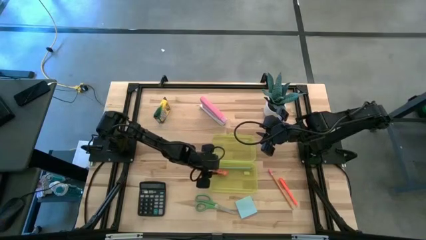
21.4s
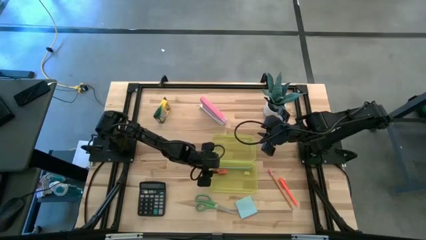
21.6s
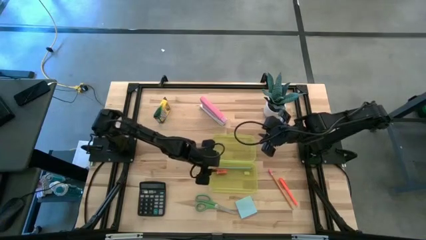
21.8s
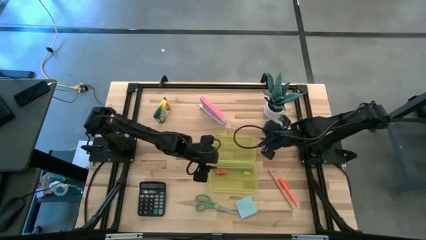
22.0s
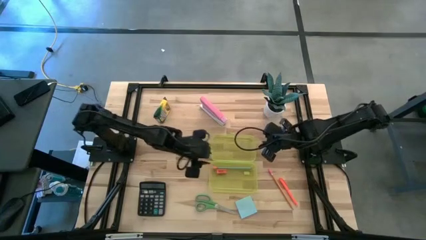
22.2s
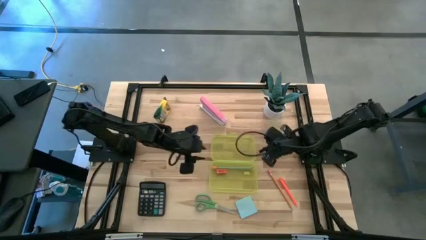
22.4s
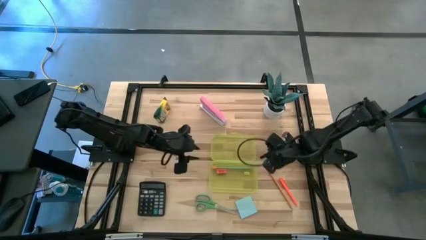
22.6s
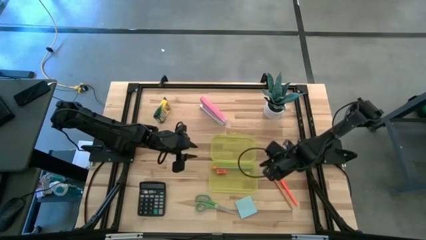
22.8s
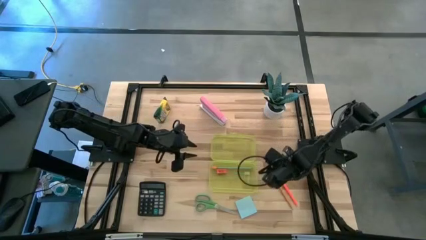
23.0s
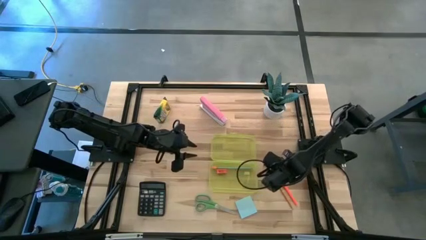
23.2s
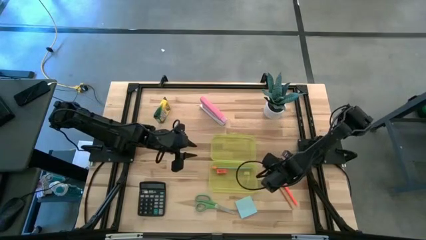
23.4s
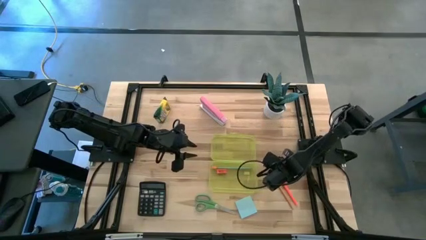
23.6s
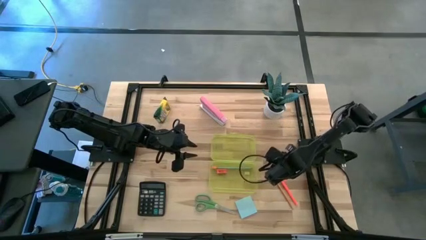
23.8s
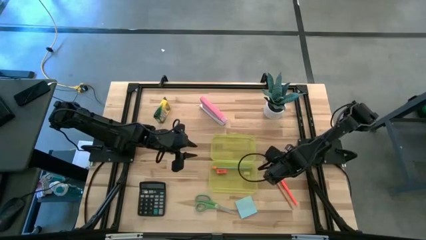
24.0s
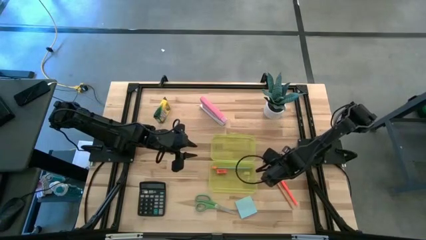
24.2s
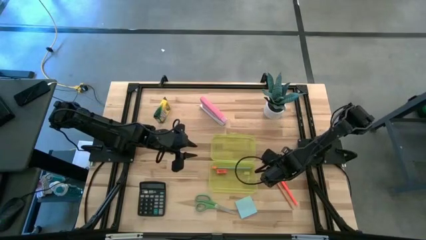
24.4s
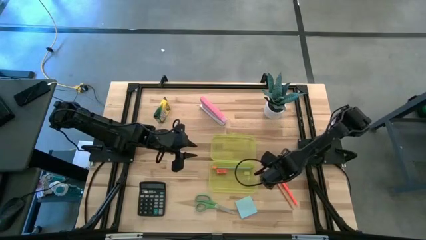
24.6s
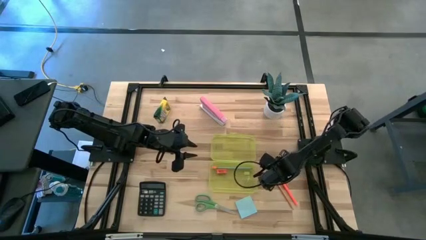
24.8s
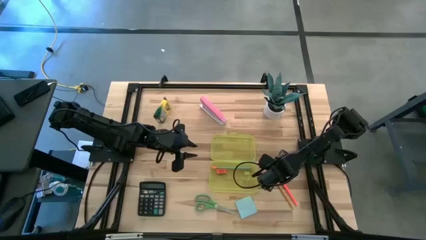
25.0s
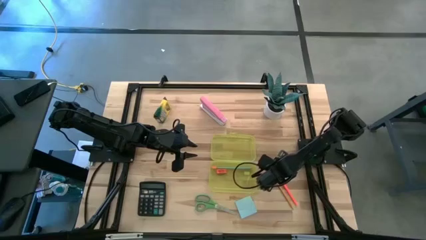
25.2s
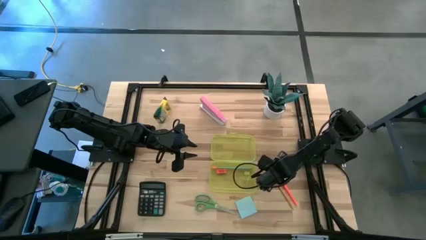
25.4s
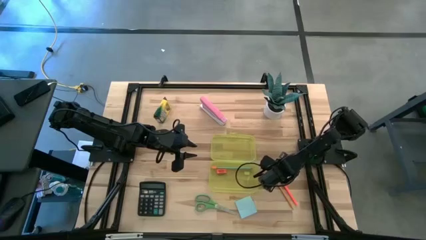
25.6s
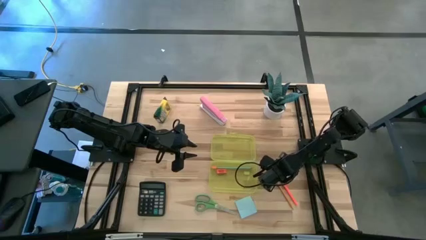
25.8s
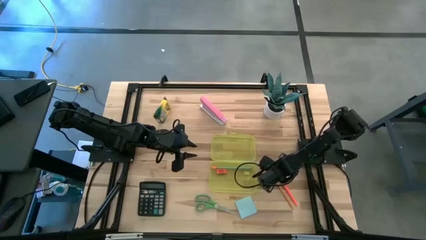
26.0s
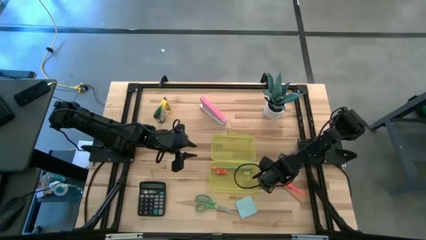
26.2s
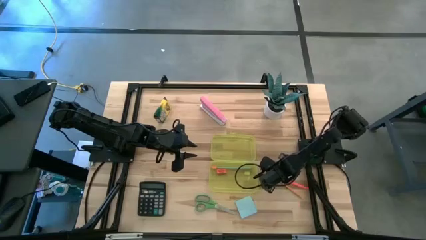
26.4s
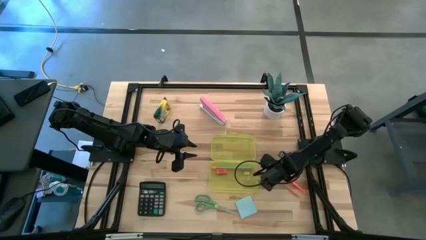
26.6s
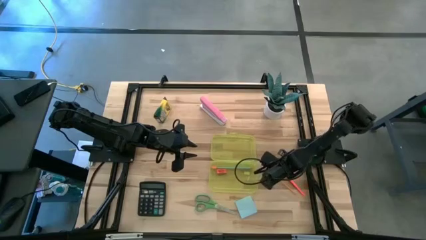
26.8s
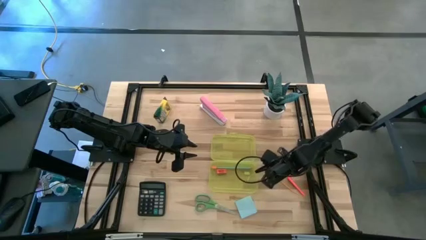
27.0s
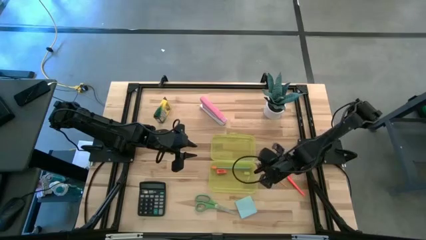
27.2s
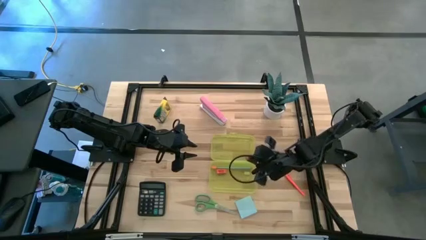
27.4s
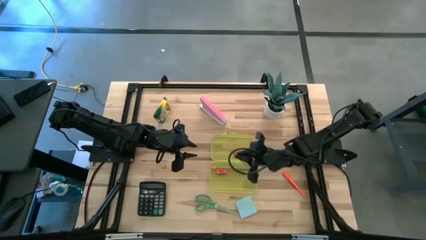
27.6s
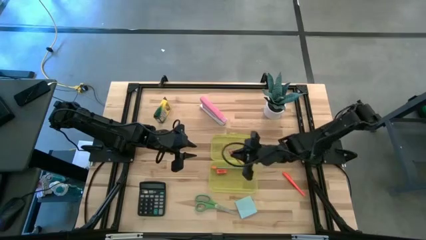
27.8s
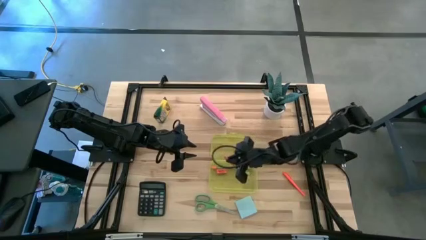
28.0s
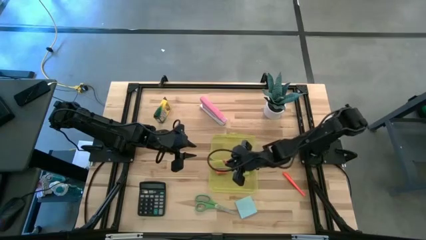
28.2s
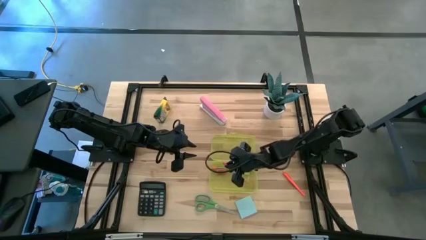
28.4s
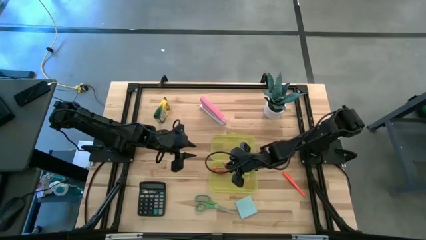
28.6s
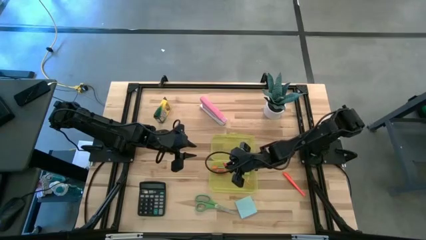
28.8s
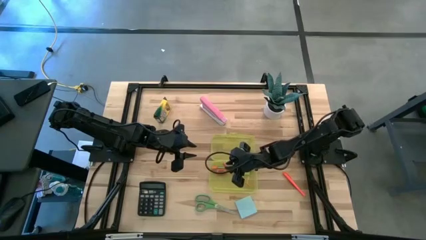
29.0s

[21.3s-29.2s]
Task: Pack school essentials
Put the orange pencil into the yellow supply box

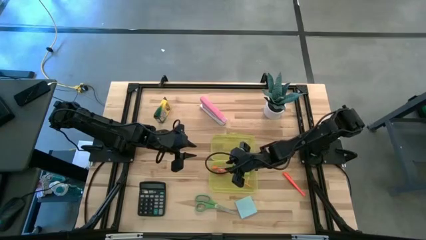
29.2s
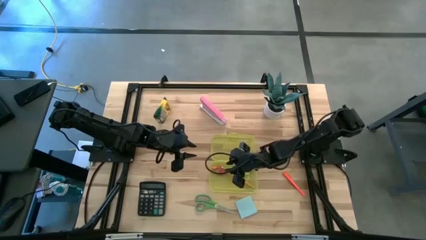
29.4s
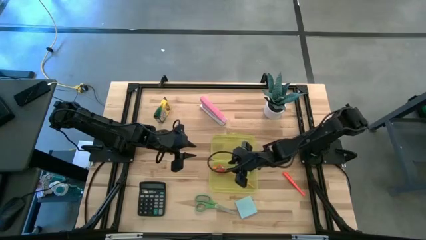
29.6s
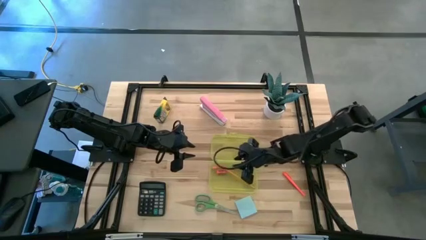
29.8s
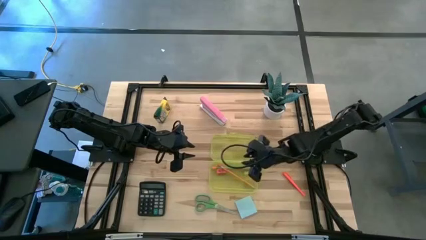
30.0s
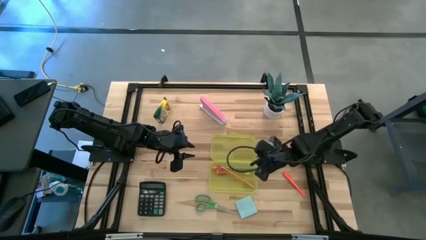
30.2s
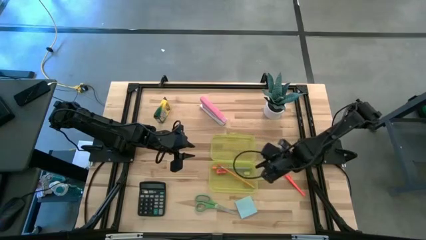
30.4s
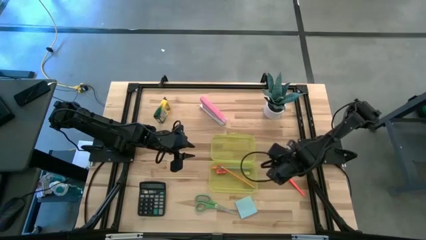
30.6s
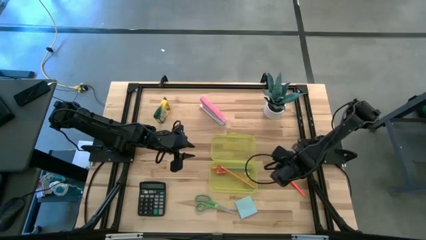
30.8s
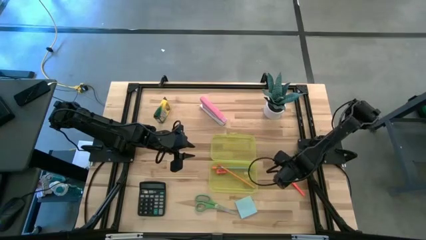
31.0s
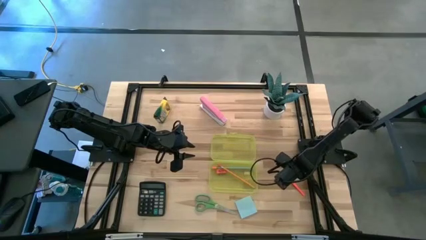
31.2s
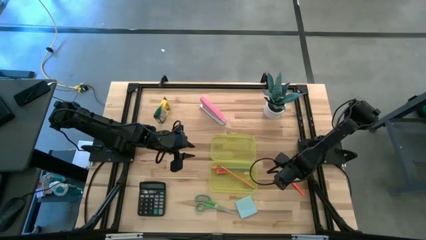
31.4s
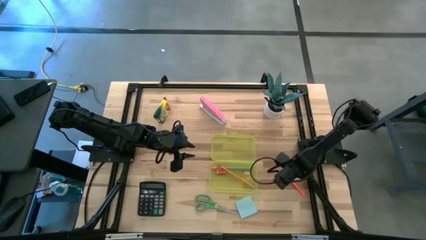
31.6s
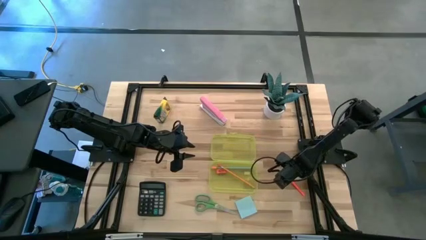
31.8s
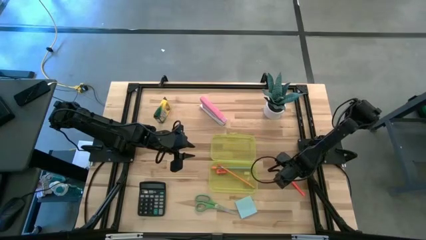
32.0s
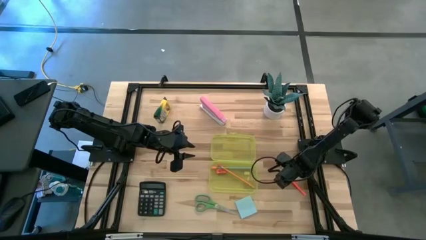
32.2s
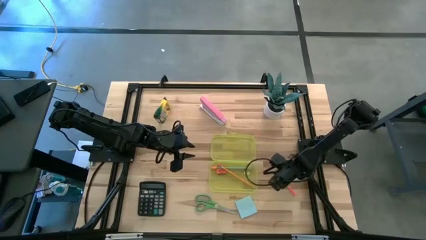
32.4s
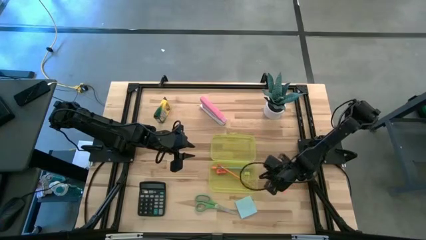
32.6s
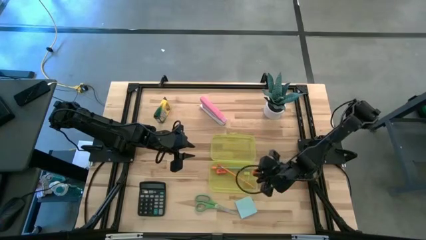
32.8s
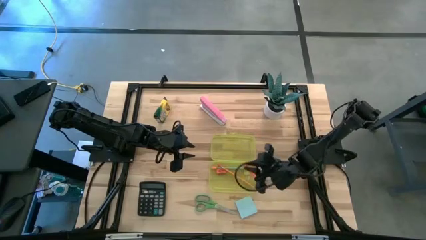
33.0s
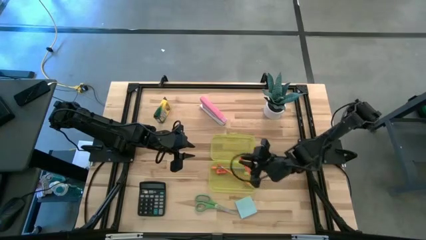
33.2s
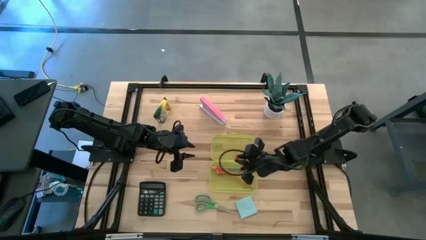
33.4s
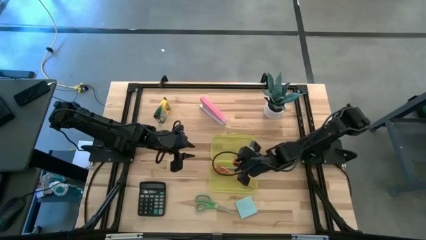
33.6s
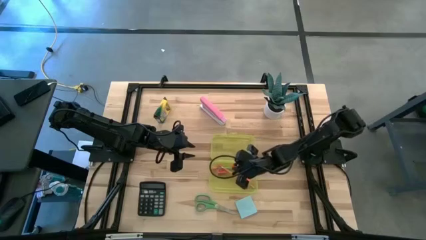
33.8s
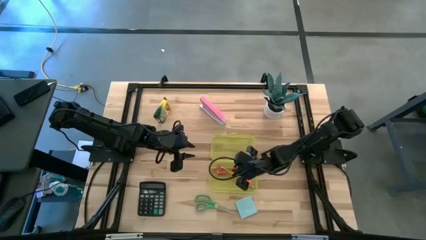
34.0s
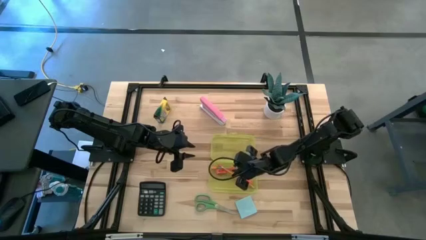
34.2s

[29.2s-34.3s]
Put the orange pen into the yellow supply box
